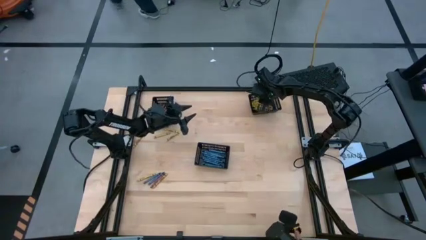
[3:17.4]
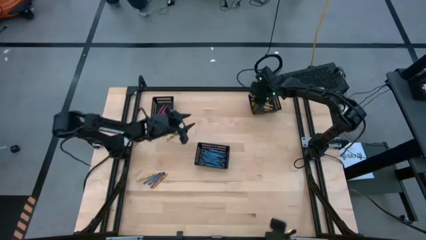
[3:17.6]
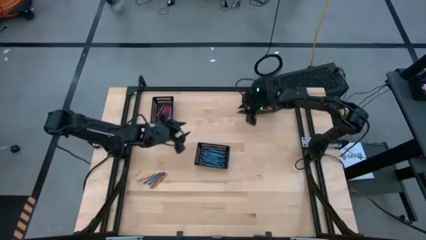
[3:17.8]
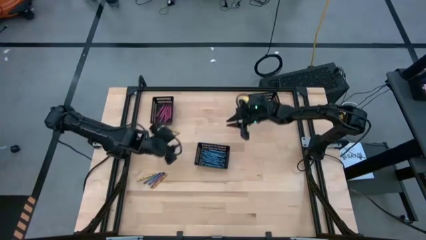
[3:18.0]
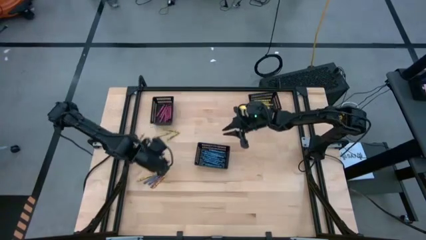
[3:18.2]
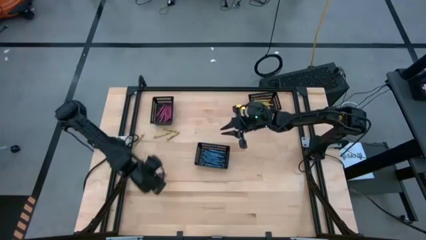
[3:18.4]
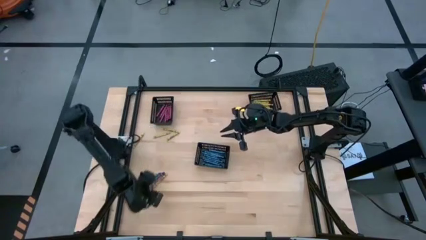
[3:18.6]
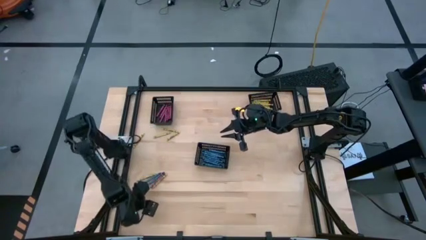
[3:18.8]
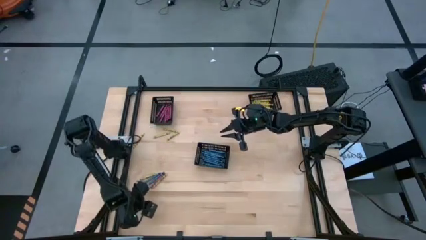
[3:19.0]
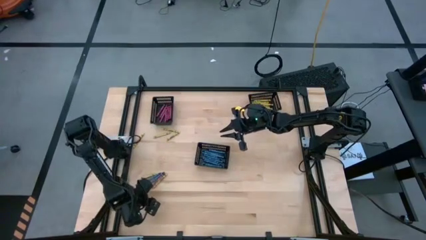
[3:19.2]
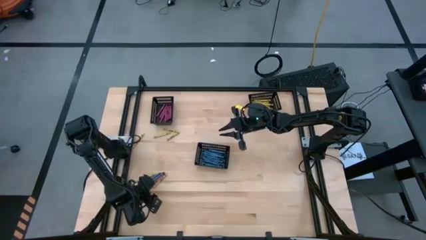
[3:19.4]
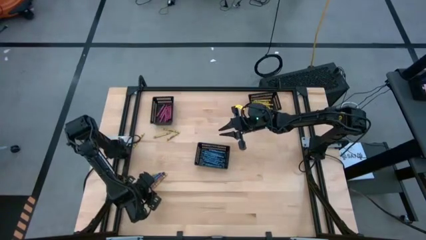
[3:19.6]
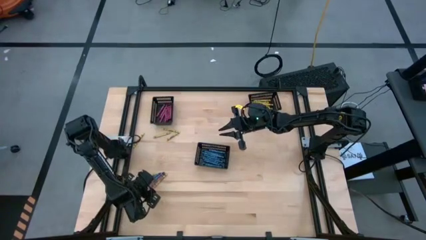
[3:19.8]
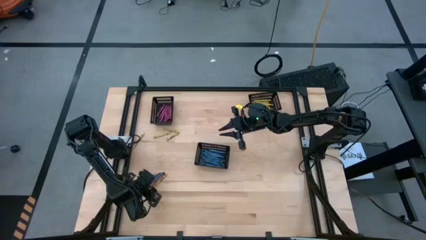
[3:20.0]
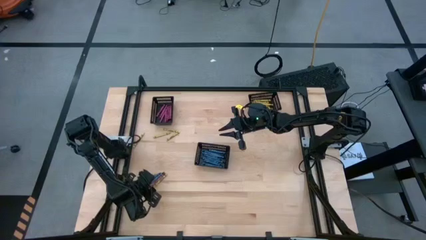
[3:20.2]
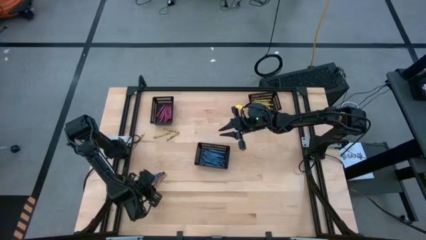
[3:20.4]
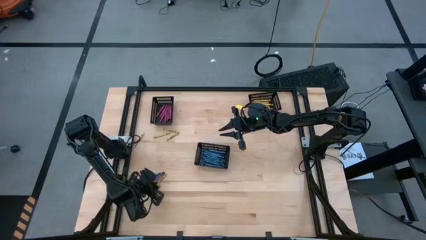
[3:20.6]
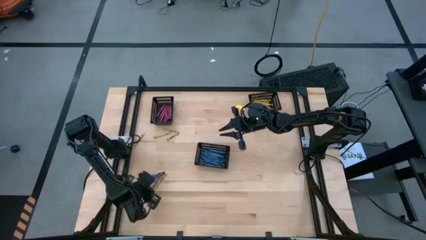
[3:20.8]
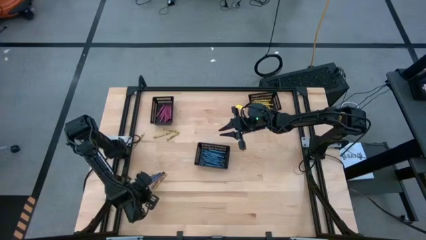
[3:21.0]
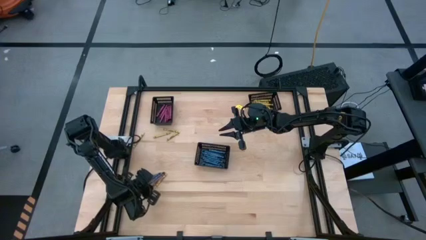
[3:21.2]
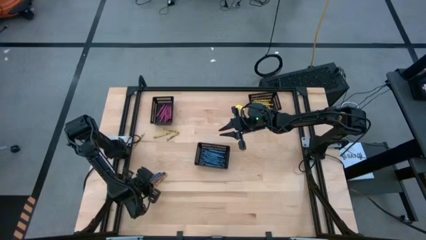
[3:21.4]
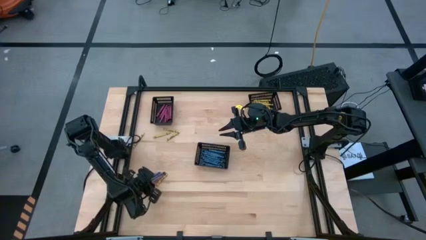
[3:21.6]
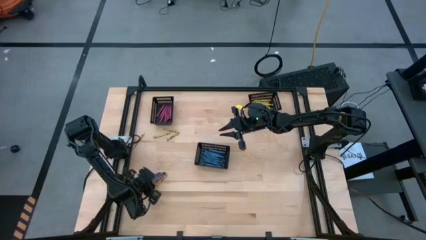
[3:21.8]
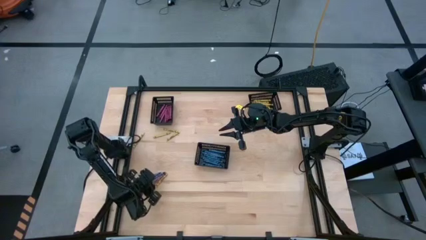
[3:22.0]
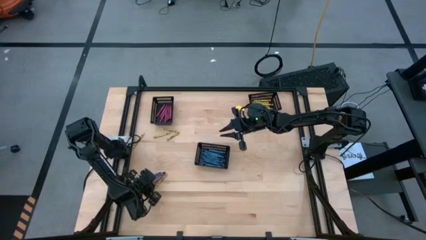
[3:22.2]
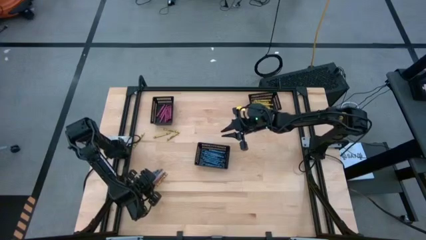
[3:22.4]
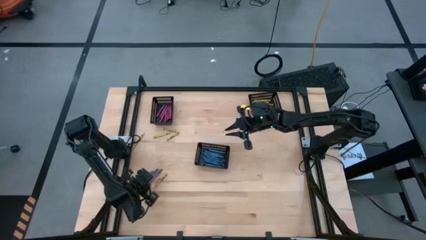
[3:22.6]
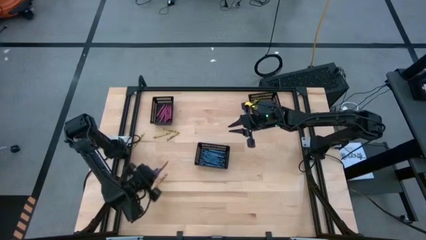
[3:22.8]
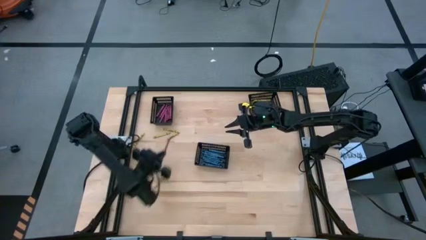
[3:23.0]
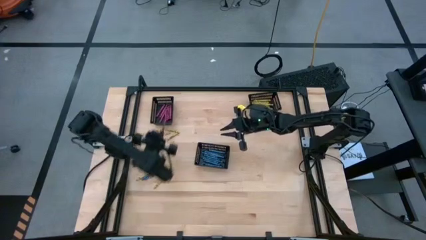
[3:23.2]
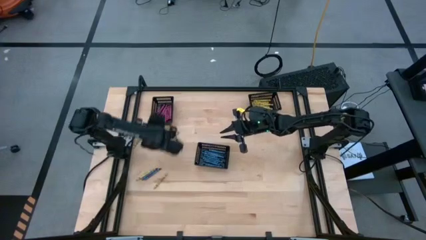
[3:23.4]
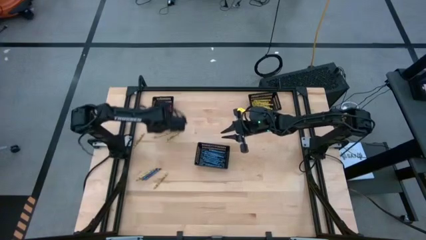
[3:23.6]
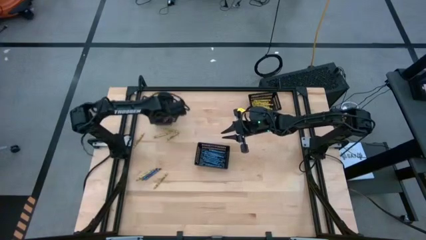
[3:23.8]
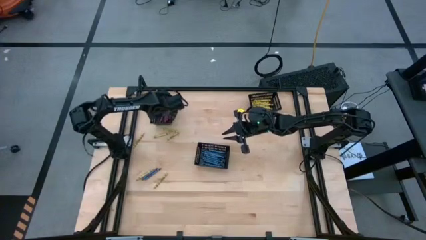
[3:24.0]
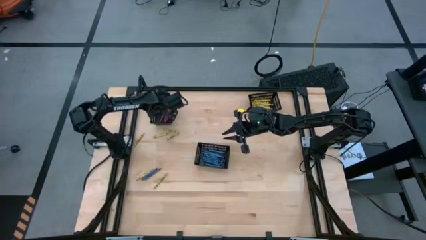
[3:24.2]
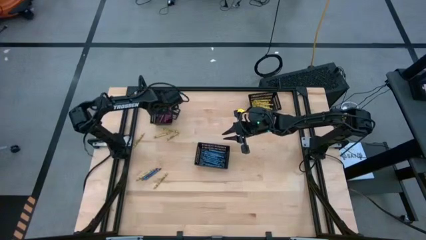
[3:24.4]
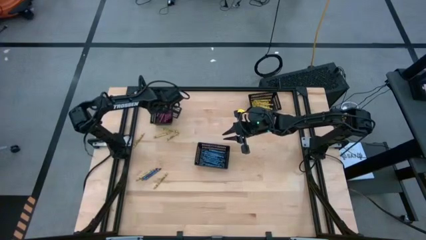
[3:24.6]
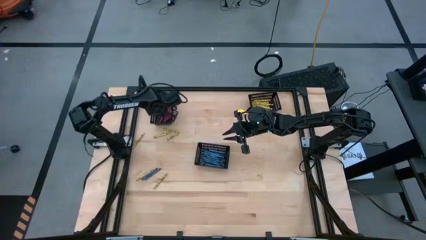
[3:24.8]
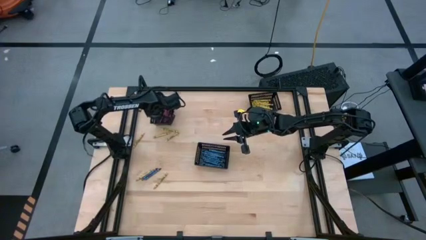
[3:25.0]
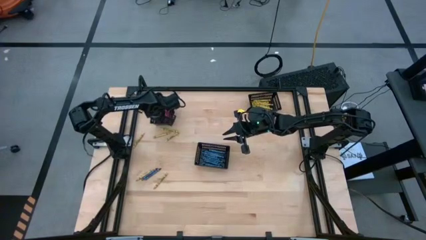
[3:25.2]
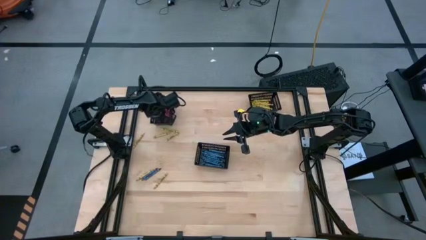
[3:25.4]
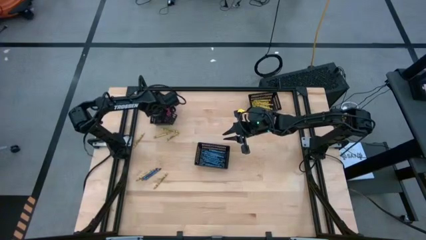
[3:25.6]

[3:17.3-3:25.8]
Task: Sort crayons
Put the pink crayon into the top left black bin

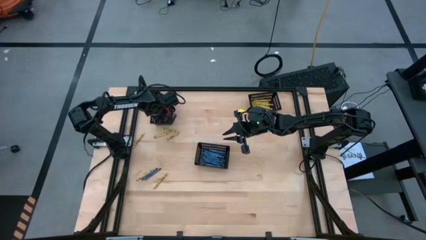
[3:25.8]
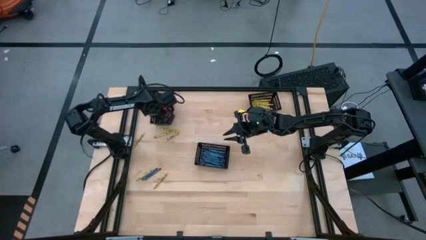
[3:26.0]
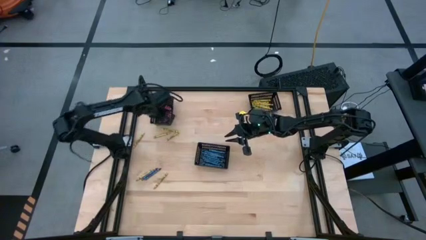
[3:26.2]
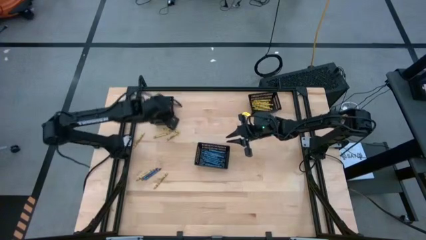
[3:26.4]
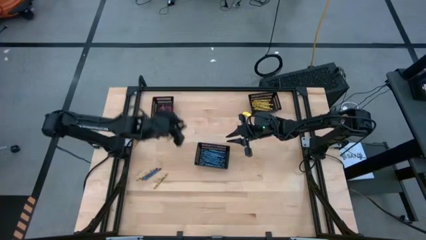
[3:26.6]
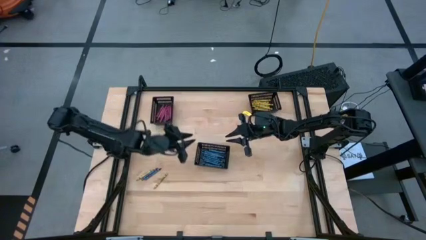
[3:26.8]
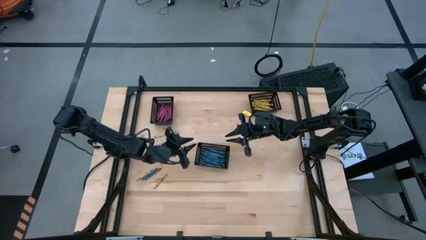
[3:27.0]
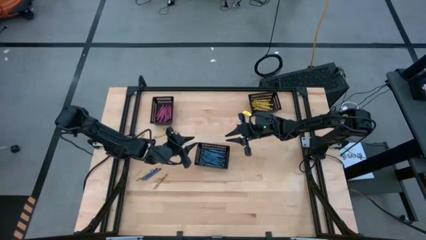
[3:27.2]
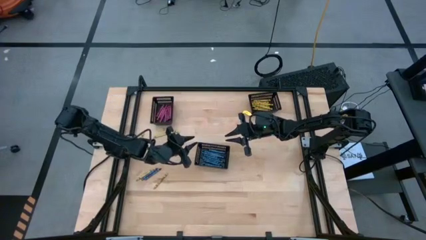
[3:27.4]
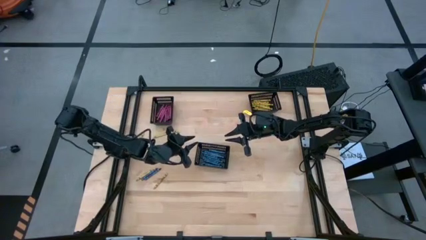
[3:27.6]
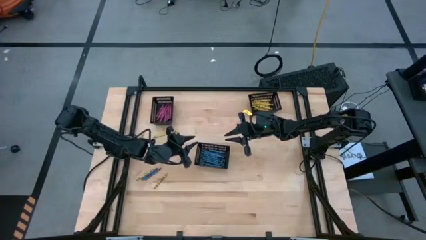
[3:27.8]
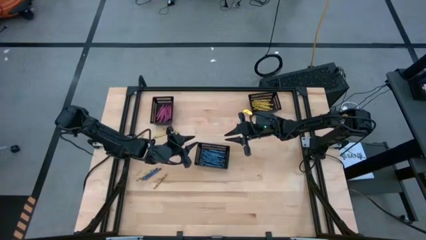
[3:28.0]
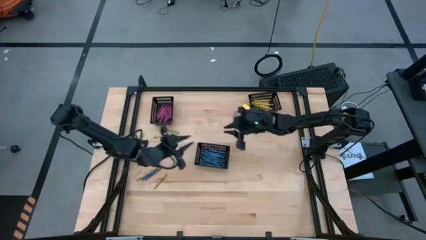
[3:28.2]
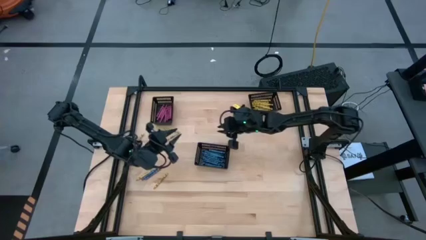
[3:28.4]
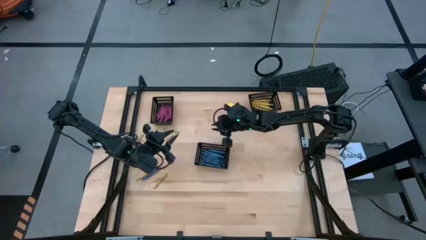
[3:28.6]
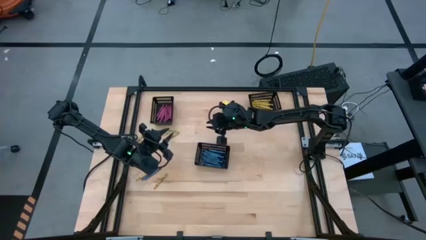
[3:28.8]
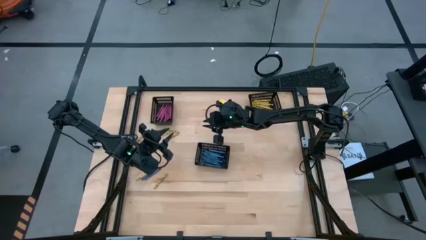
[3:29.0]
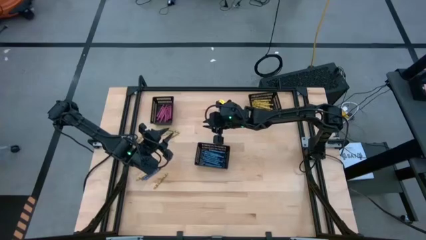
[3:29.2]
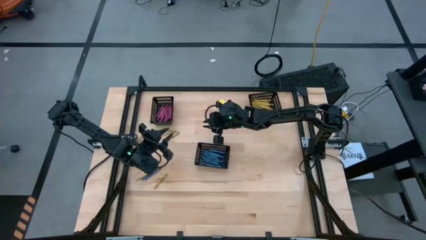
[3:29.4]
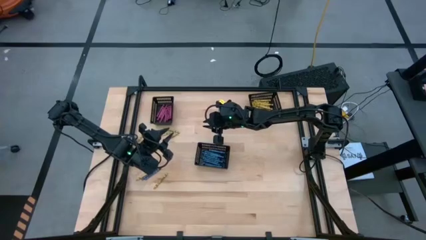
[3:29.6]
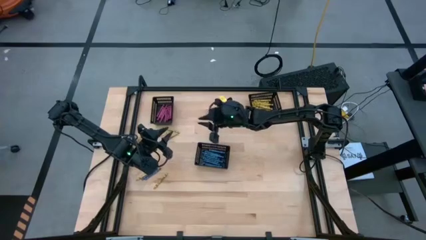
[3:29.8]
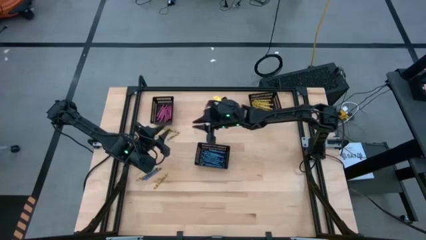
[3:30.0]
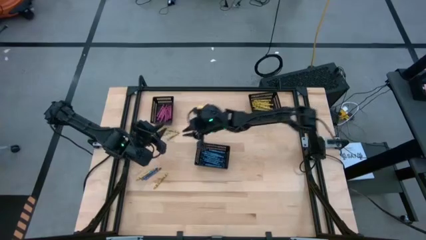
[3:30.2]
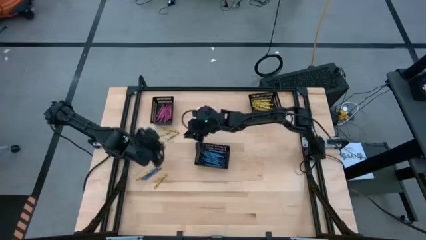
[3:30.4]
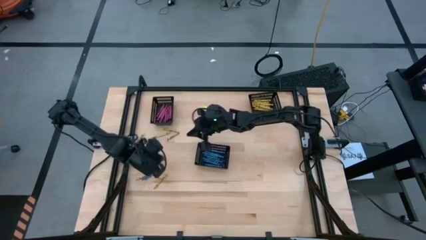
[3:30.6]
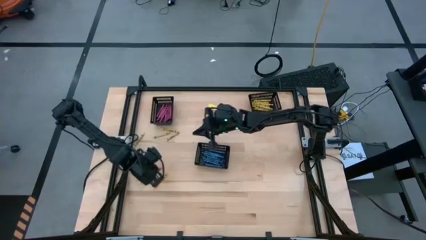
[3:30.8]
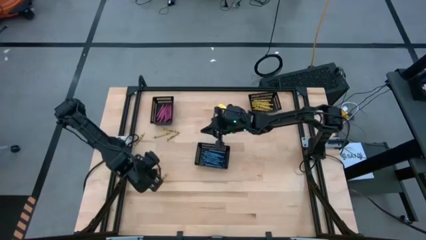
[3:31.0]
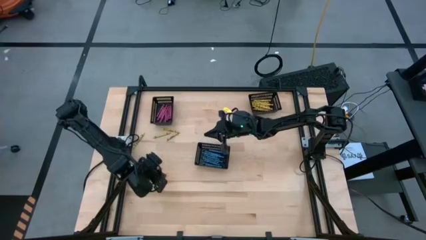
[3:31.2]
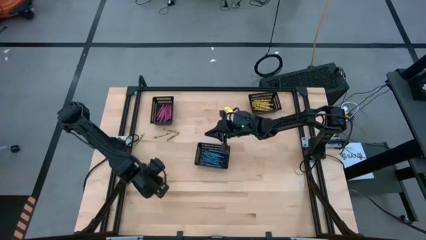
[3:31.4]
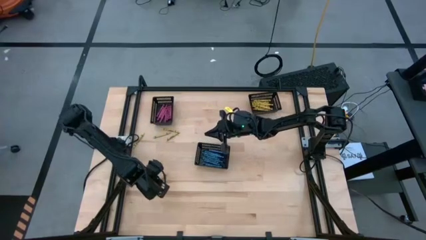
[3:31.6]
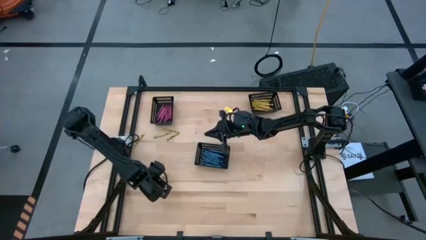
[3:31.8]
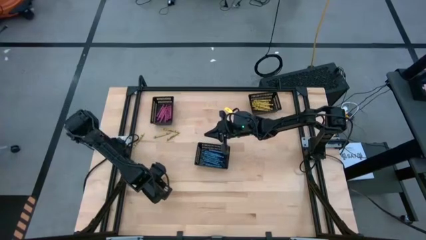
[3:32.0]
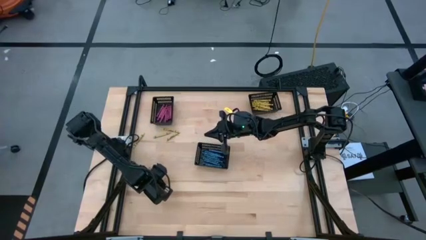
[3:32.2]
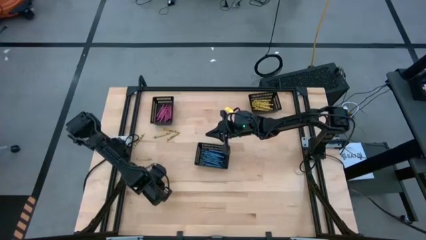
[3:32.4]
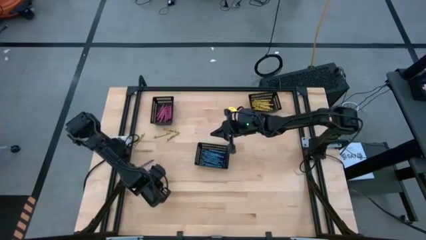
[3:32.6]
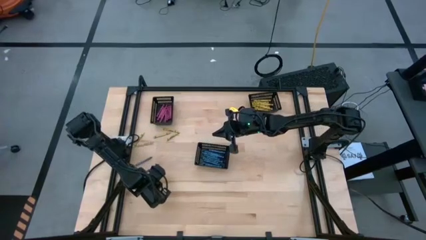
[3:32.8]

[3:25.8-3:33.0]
Put the yellow crayon into the top right black bin
